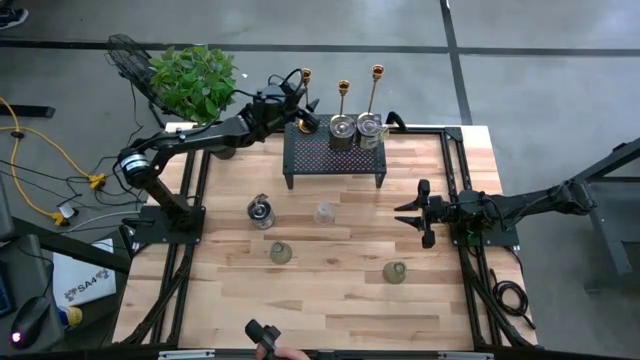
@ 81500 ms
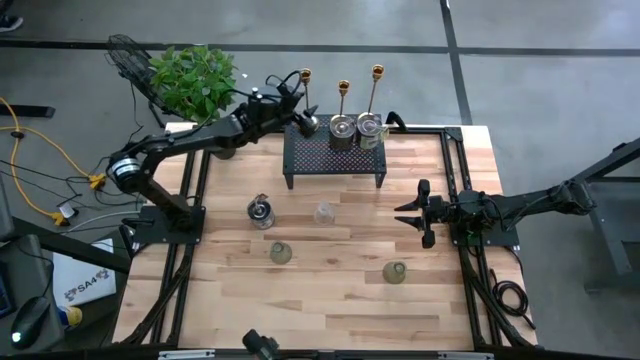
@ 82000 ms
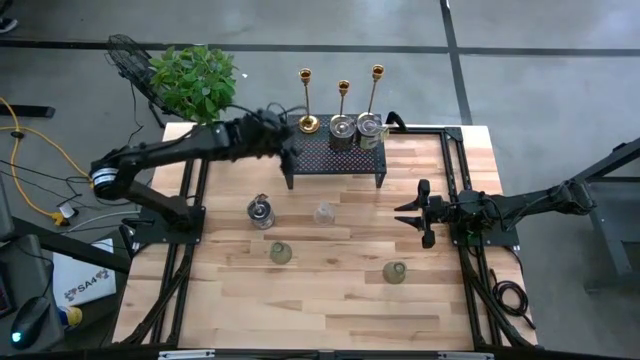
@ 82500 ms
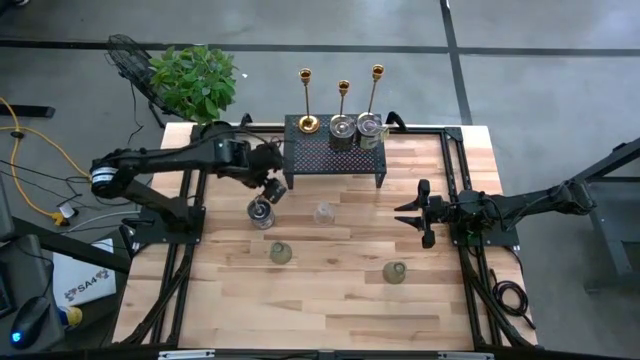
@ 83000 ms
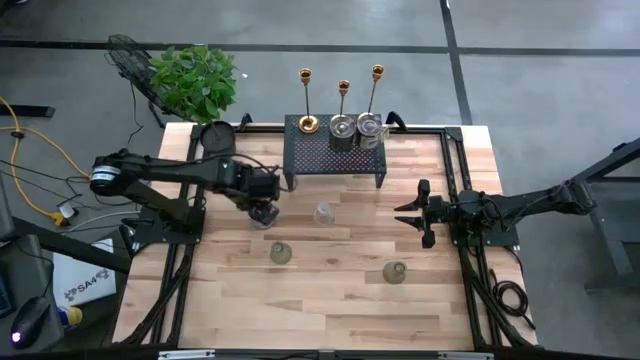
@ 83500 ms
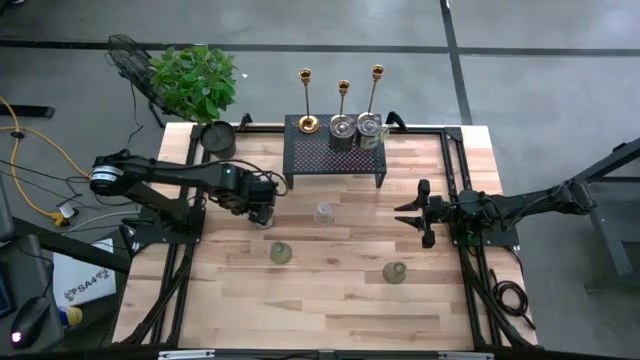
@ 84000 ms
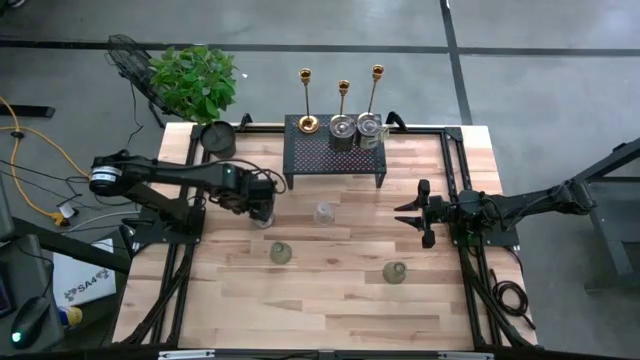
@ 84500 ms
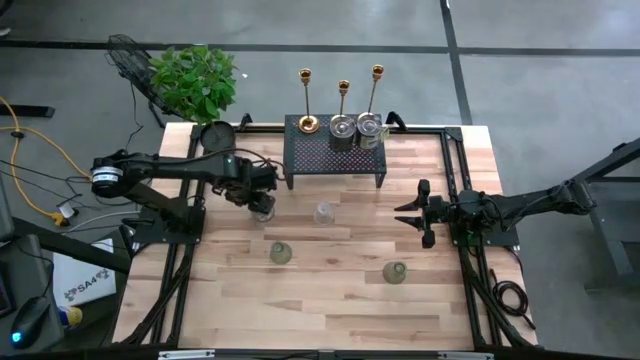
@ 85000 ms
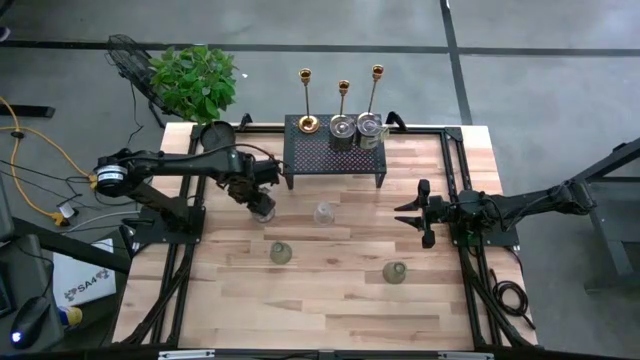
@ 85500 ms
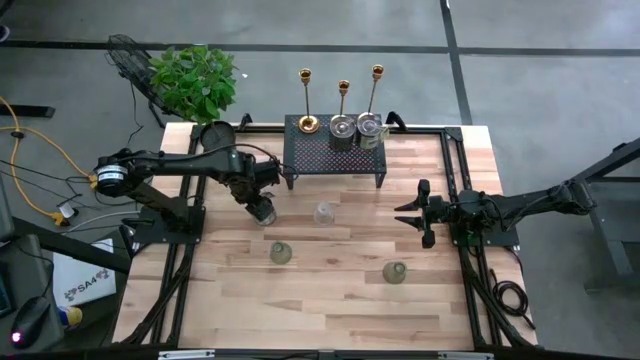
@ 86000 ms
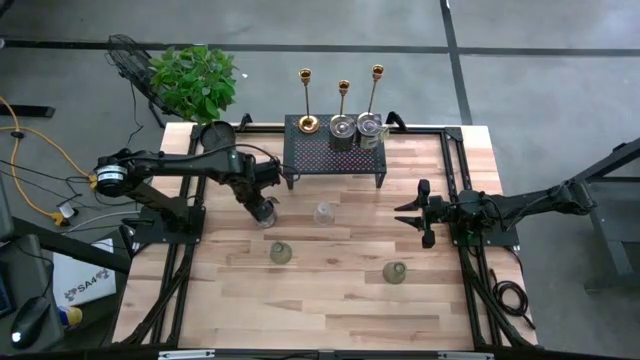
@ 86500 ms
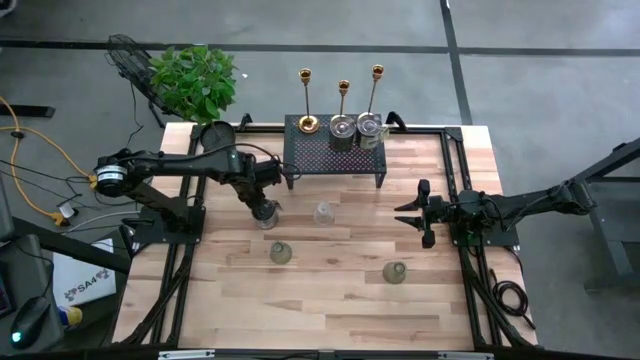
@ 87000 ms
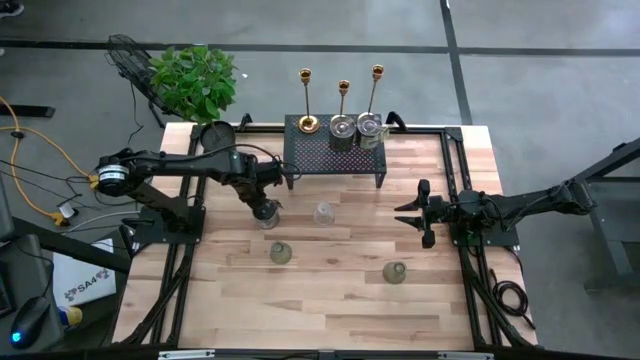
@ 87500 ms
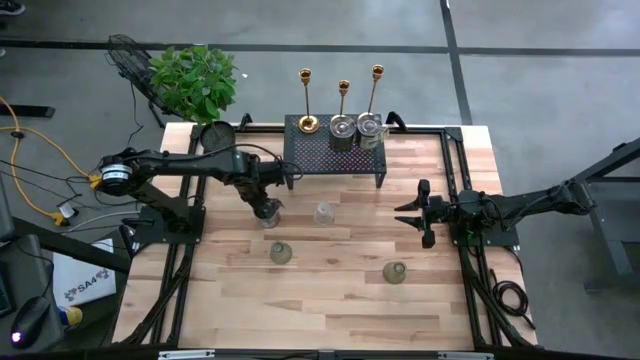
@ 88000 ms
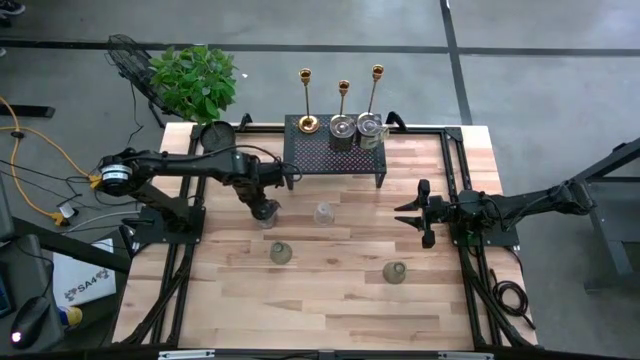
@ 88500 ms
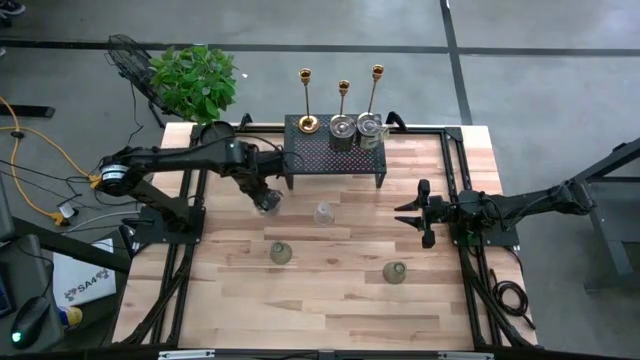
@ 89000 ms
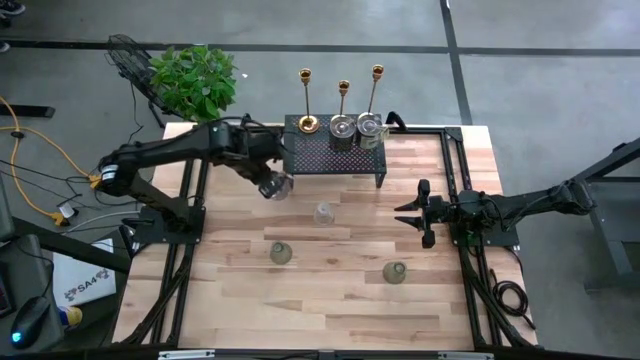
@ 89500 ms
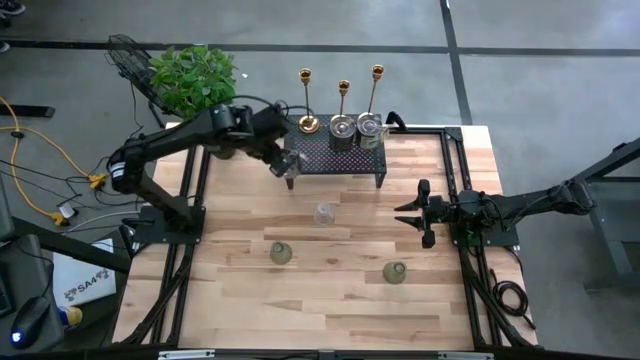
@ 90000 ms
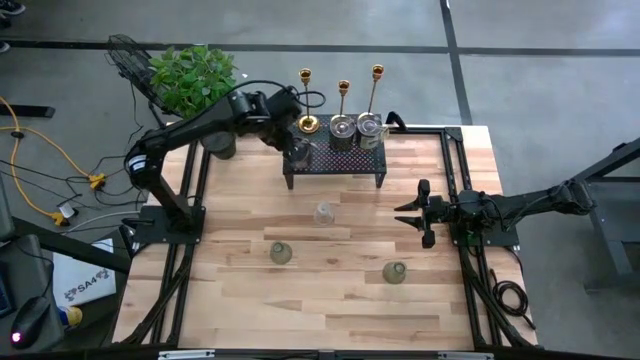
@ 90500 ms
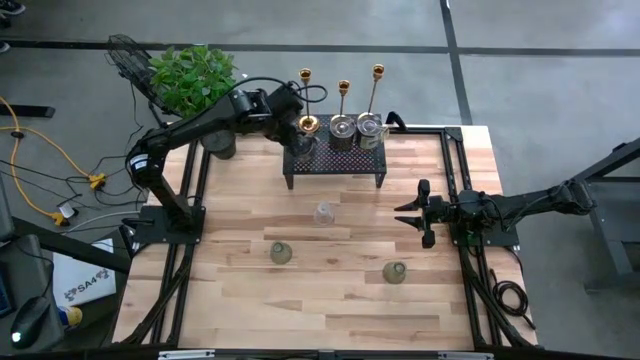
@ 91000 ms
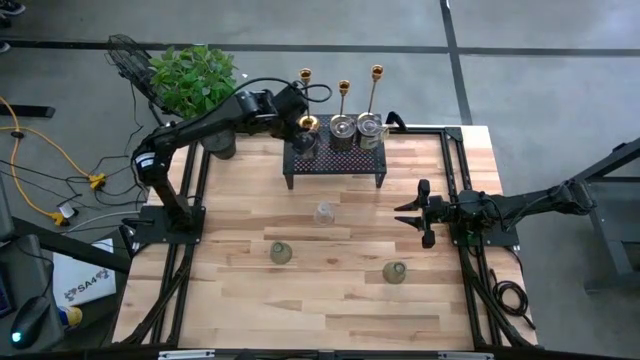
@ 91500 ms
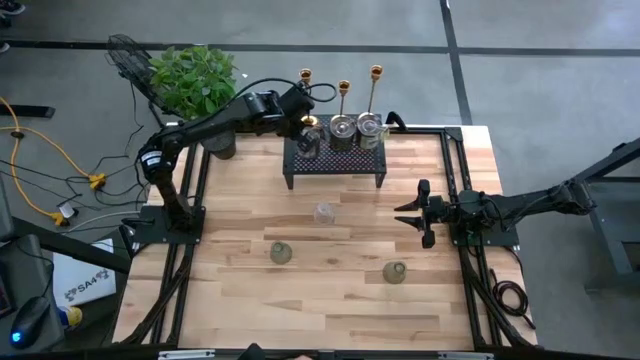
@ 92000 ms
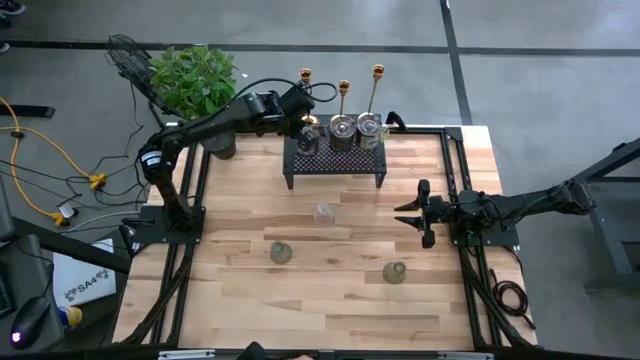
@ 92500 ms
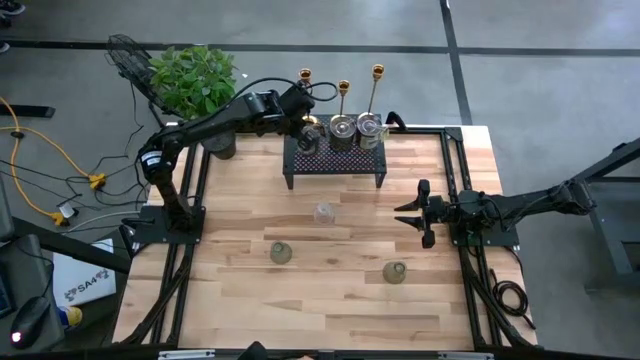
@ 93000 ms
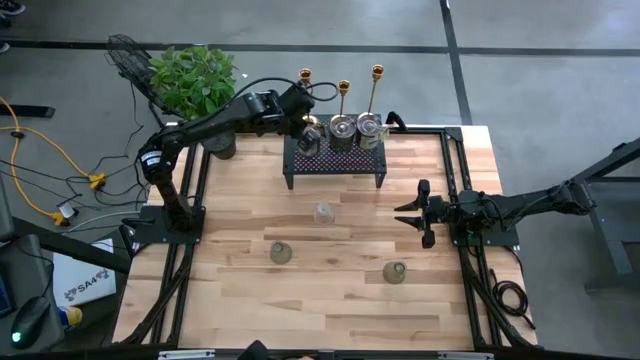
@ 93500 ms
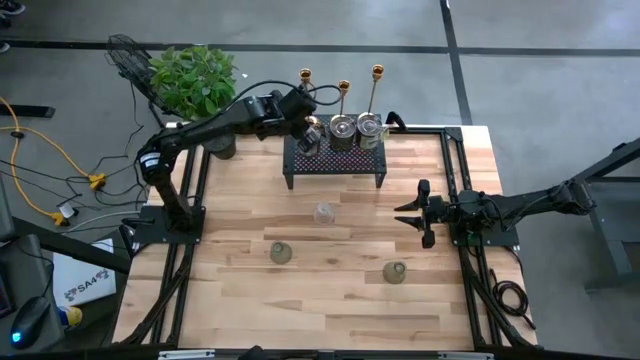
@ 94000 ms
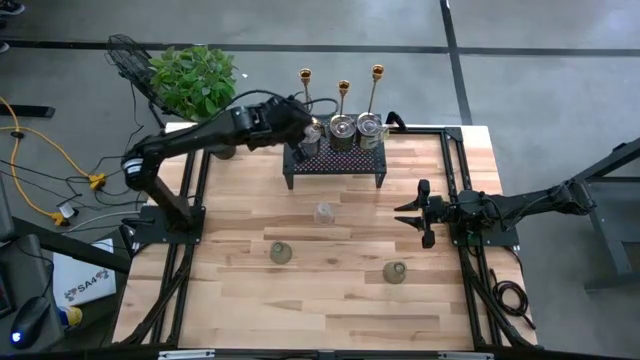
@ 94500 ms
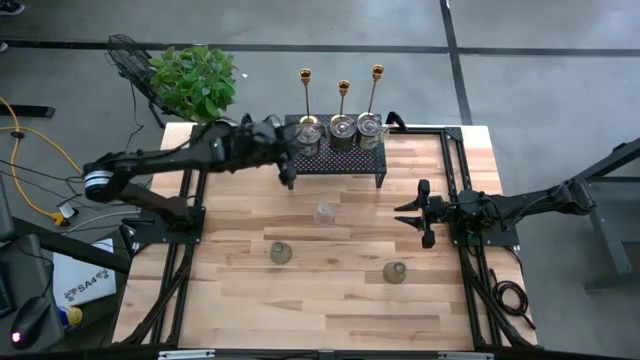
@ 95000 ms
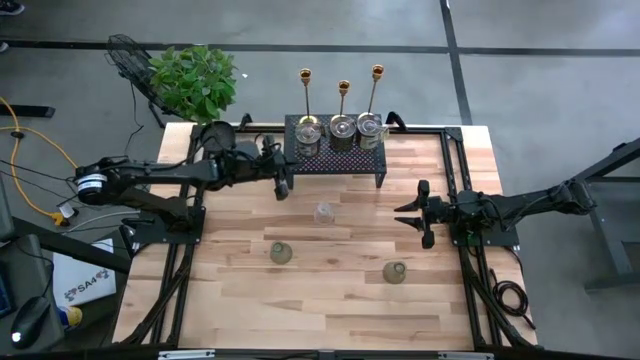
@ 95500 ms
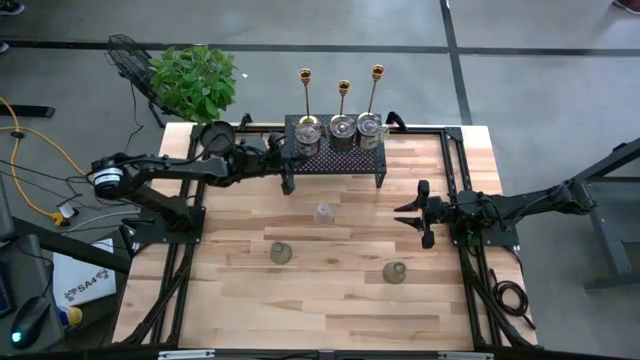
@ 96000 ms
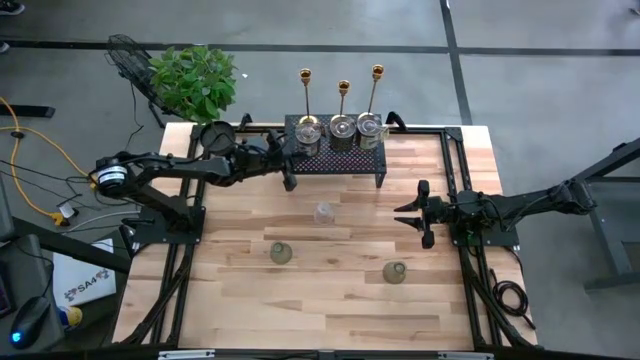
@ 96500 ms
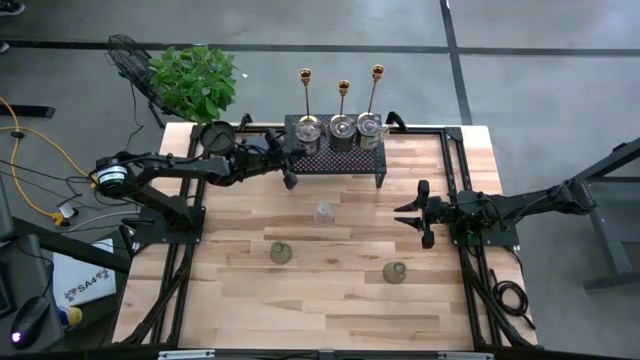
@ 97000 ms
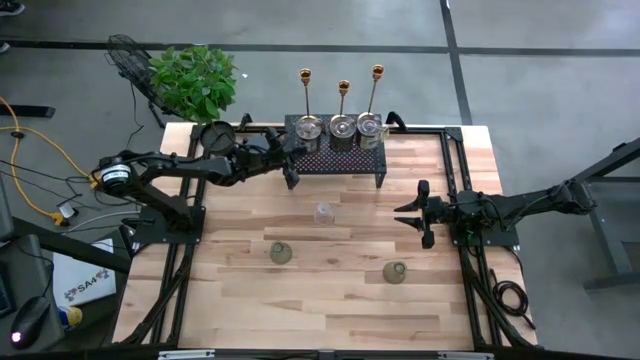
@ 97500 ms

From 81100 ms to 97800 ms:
Task: Pick & Place candle stick holders
Put the silver scented candle on the shelf aligned with the other silver scented candle

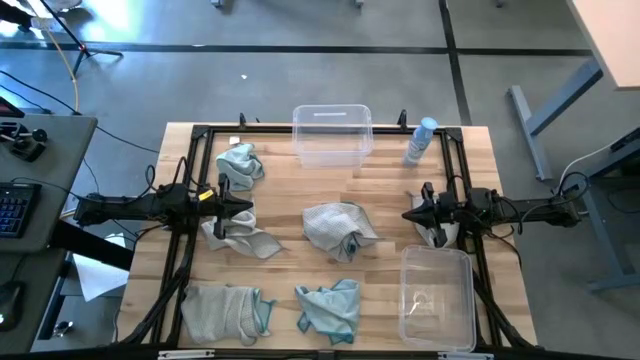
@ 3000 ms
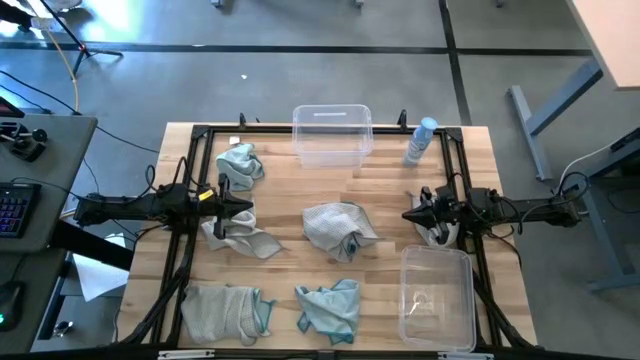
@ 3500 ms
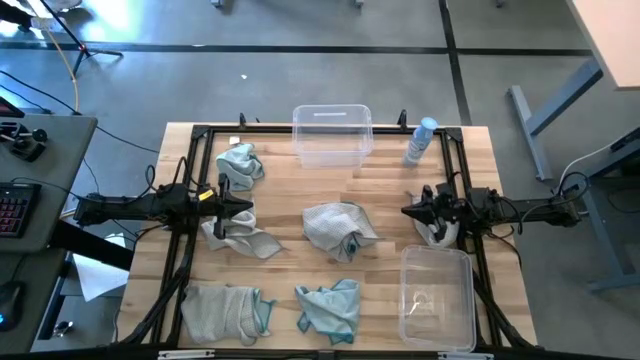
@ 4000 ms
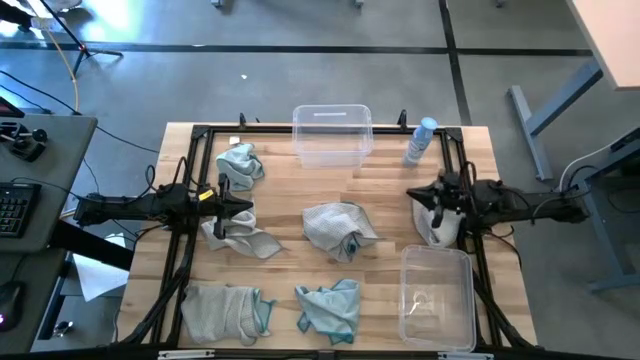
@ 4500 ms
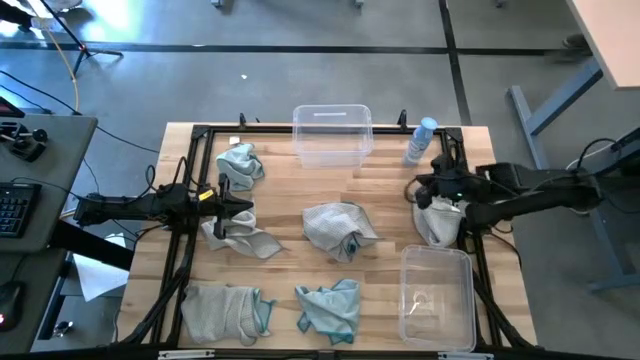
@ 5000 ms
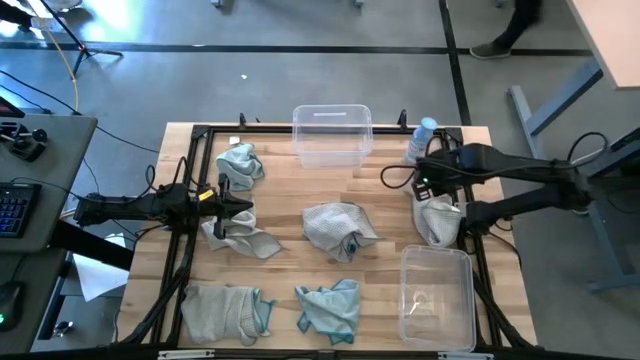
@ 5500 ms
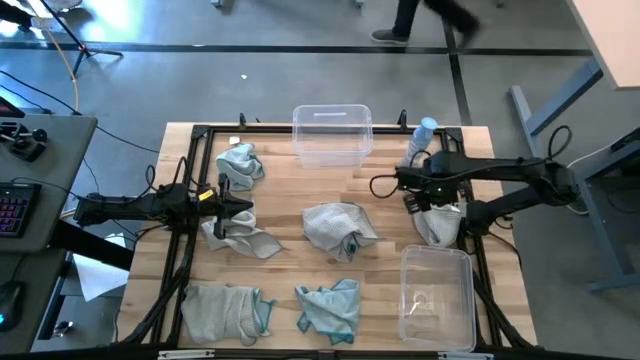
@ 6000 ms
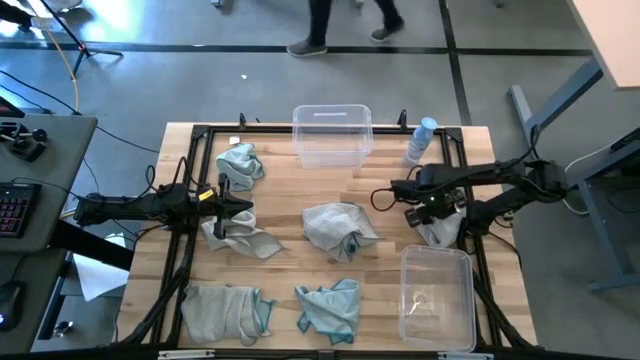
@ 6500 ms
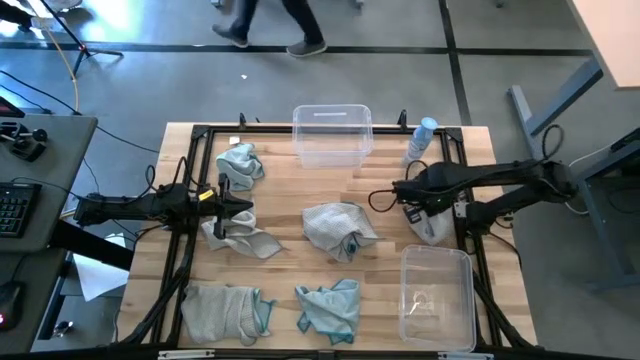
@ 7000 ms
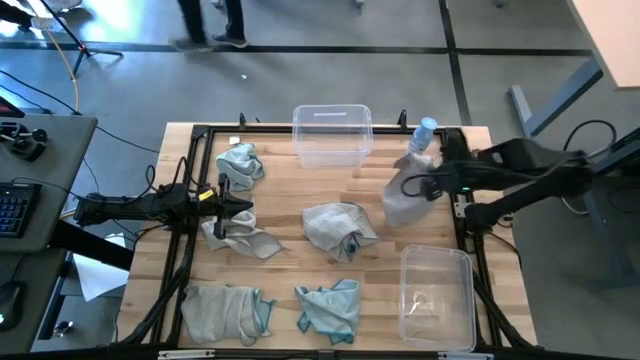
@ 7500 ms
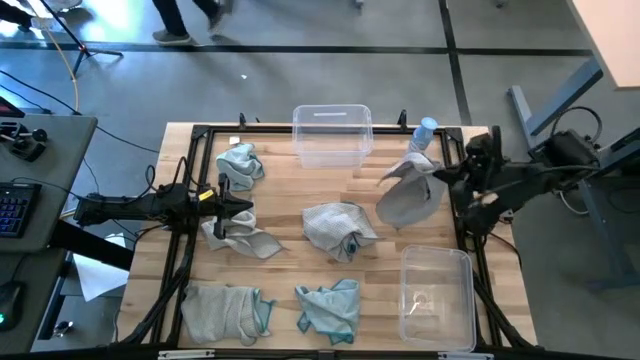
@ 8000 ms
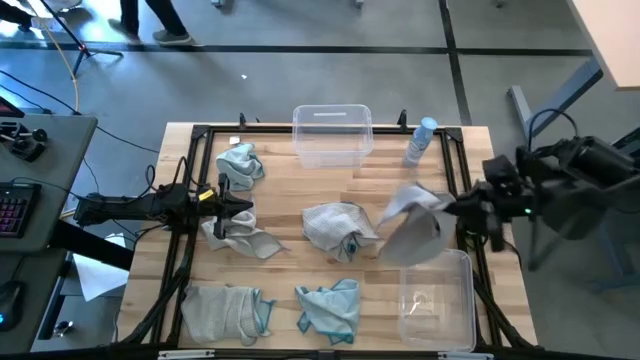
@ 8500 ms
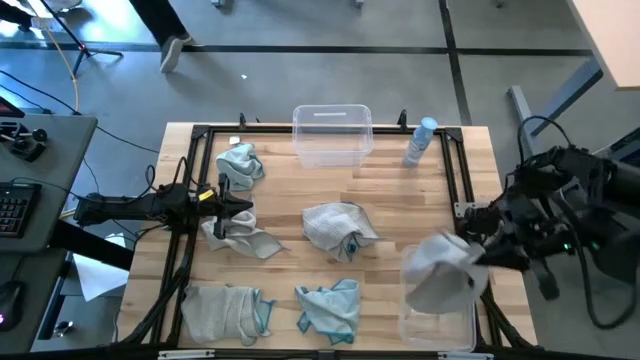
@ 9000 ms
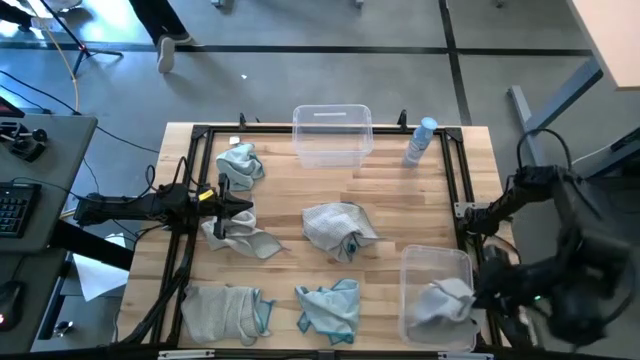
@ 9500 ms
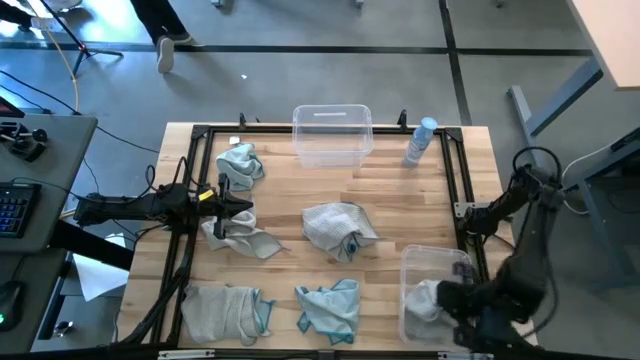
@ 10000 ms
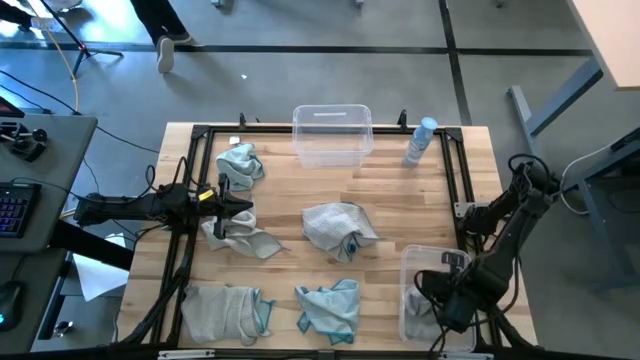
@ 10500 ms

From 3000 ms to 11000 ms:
Task: Sort microfiber towel by color & place in baskets
Put the gray microfiber towel into the bottom transparent bin
